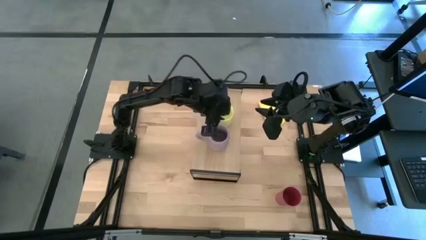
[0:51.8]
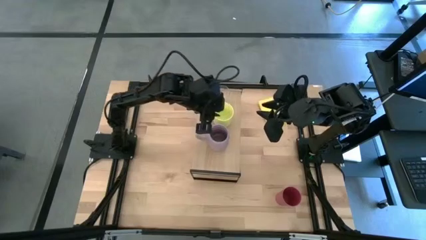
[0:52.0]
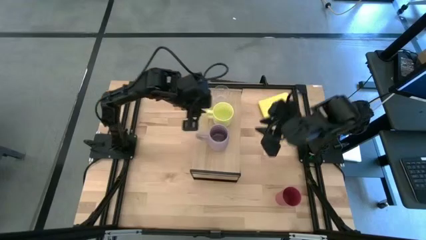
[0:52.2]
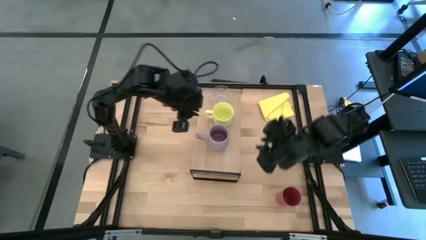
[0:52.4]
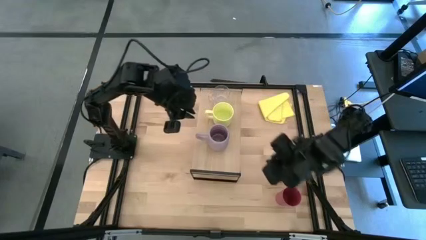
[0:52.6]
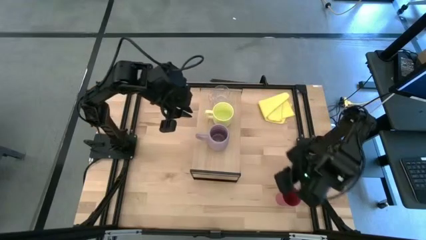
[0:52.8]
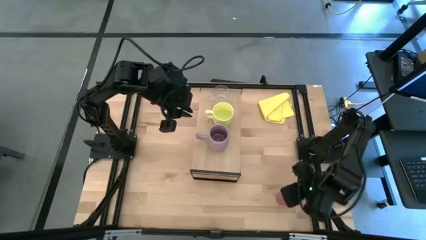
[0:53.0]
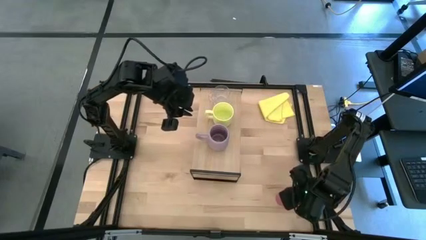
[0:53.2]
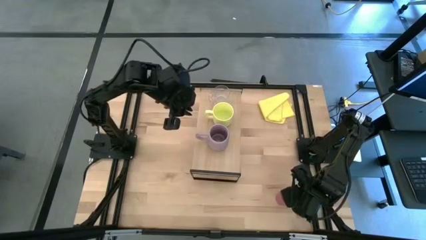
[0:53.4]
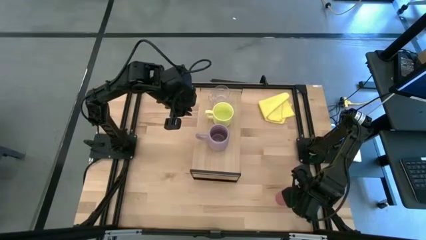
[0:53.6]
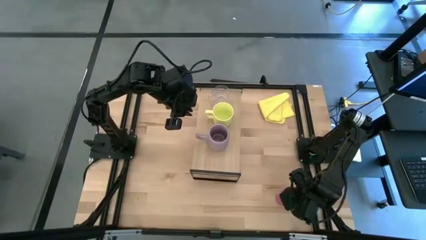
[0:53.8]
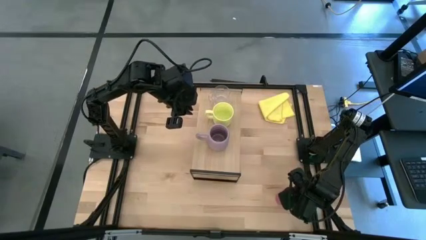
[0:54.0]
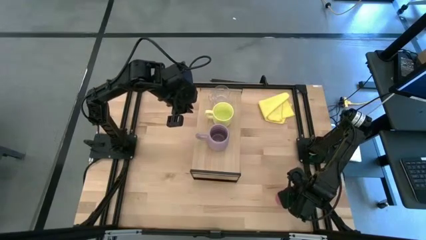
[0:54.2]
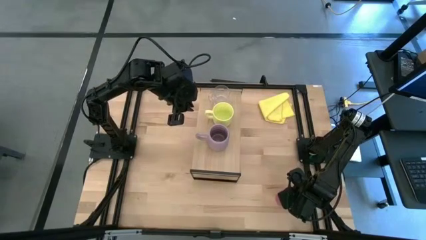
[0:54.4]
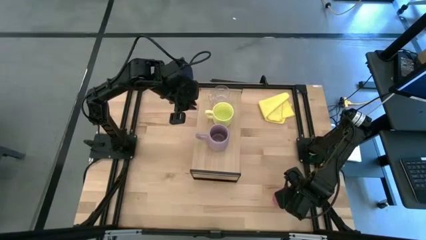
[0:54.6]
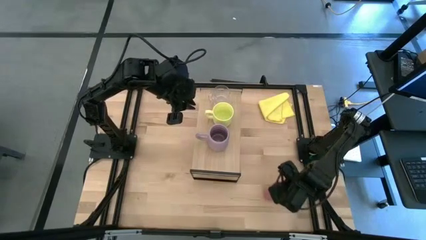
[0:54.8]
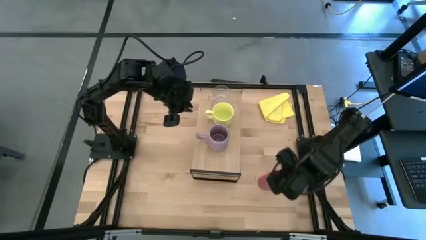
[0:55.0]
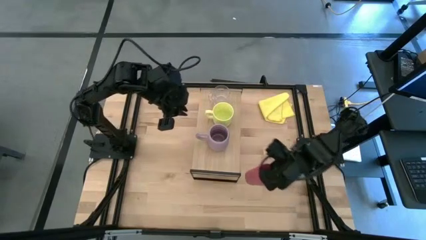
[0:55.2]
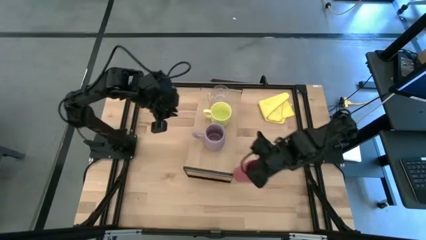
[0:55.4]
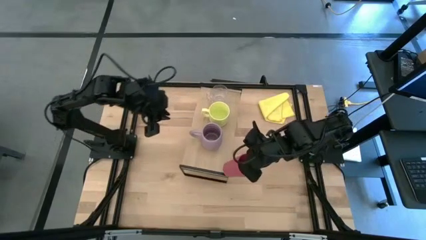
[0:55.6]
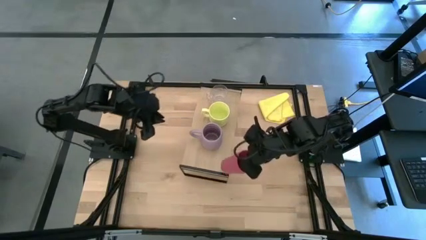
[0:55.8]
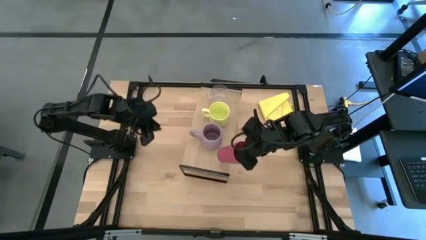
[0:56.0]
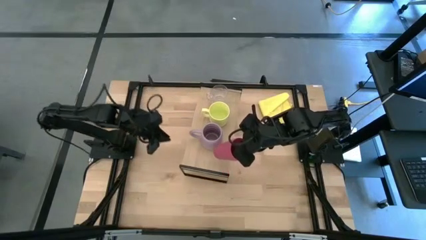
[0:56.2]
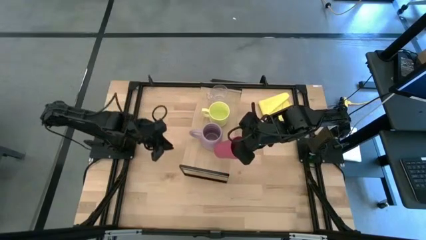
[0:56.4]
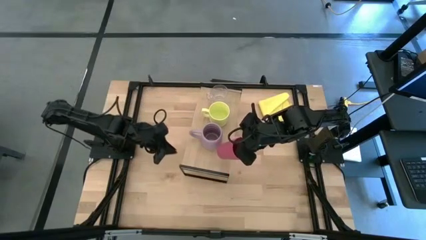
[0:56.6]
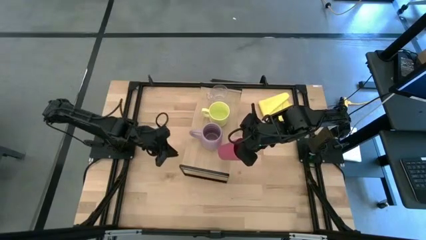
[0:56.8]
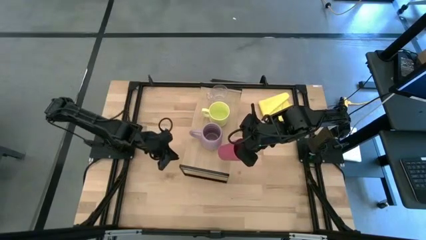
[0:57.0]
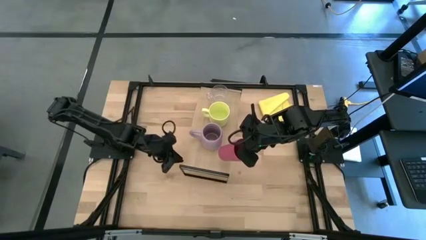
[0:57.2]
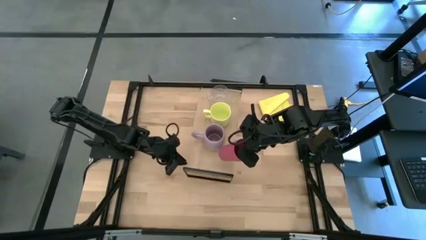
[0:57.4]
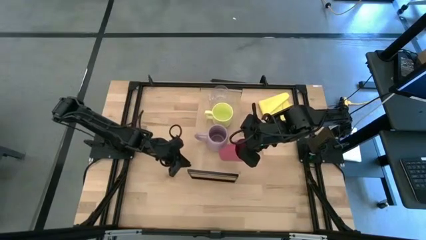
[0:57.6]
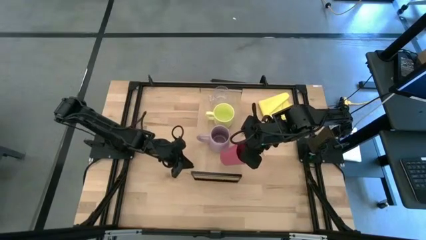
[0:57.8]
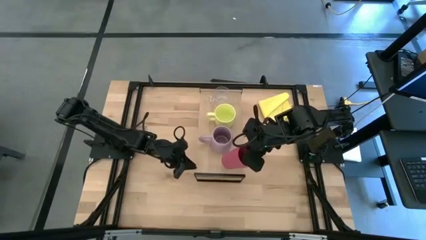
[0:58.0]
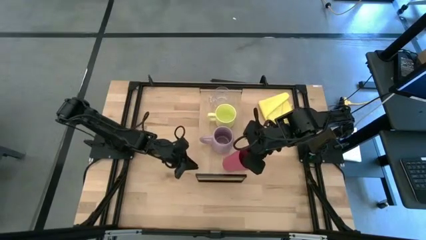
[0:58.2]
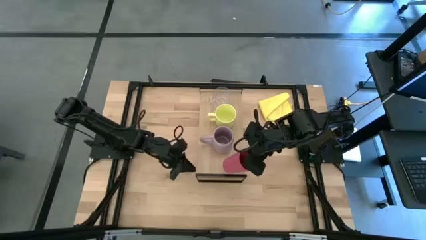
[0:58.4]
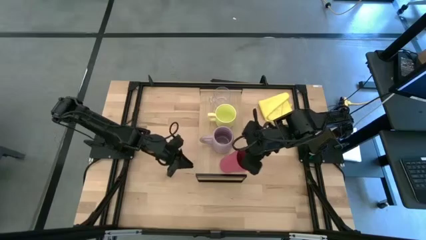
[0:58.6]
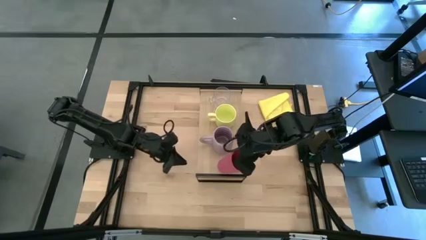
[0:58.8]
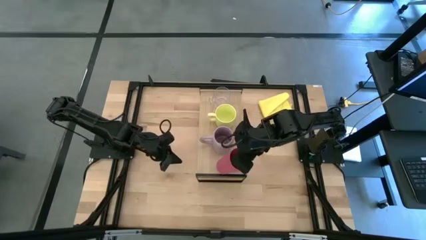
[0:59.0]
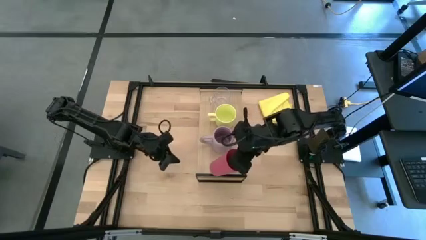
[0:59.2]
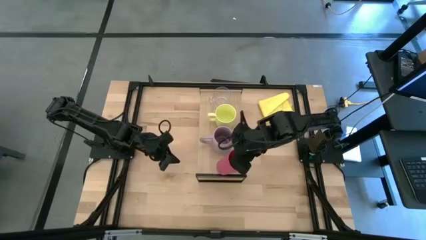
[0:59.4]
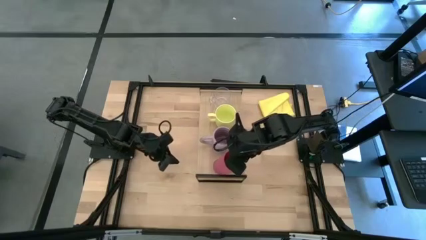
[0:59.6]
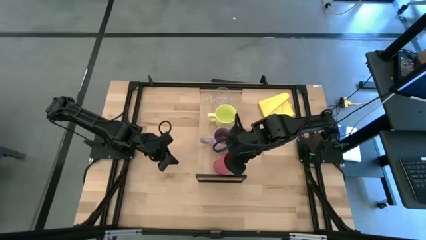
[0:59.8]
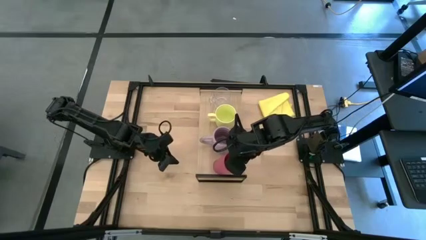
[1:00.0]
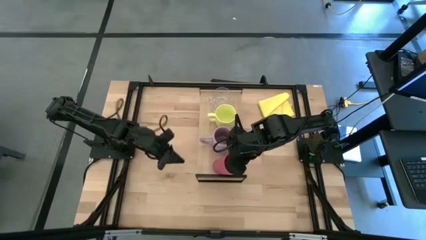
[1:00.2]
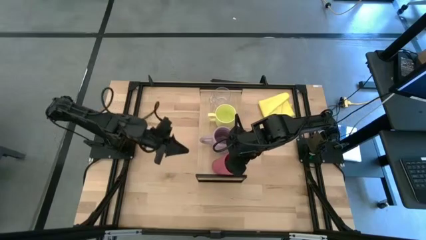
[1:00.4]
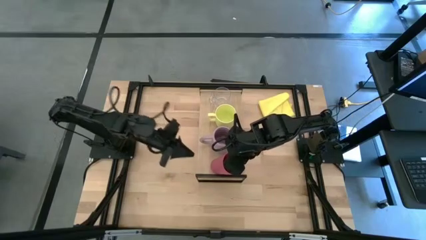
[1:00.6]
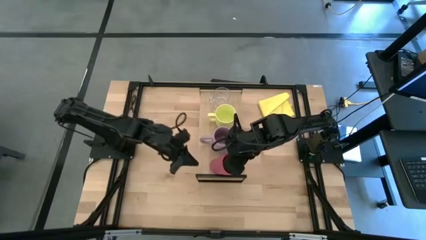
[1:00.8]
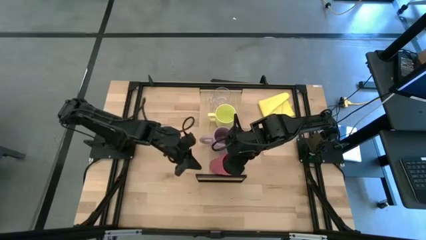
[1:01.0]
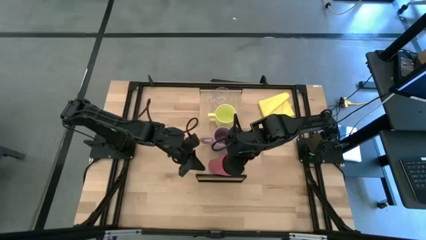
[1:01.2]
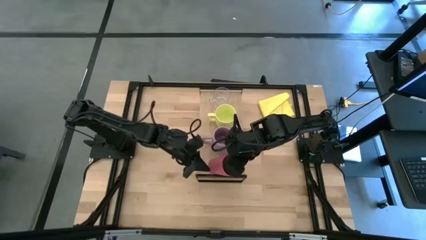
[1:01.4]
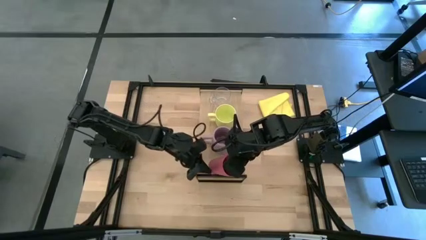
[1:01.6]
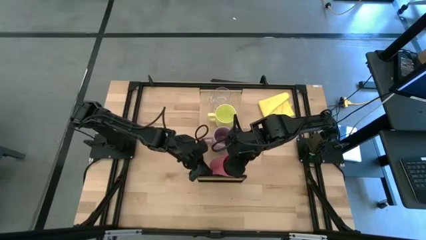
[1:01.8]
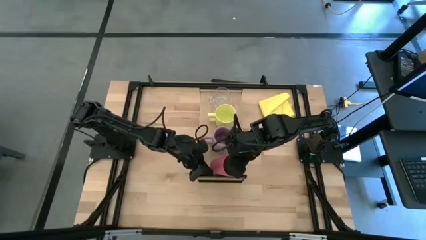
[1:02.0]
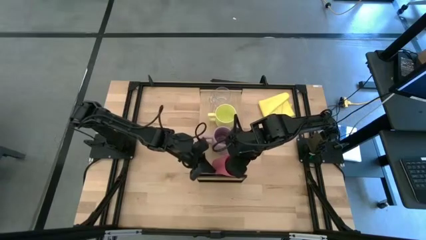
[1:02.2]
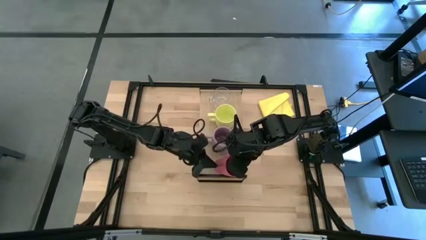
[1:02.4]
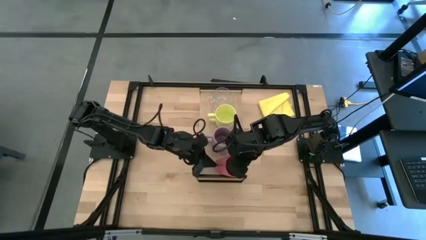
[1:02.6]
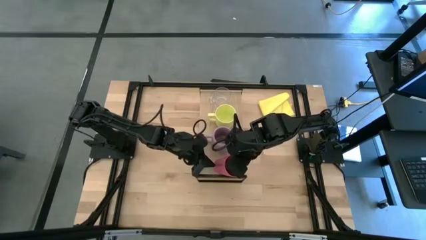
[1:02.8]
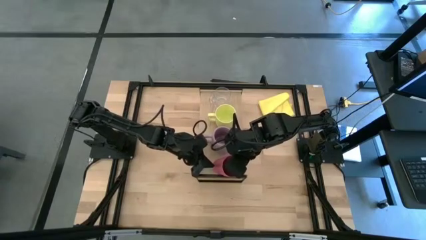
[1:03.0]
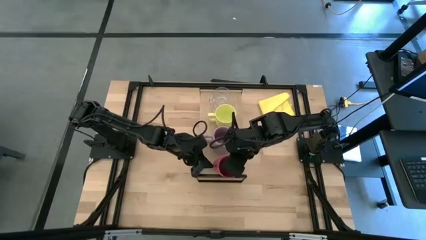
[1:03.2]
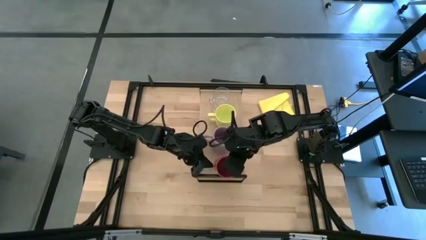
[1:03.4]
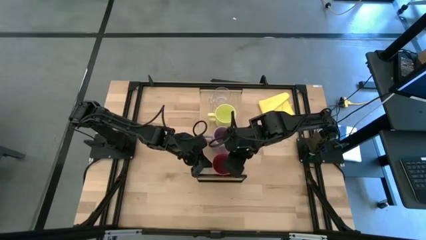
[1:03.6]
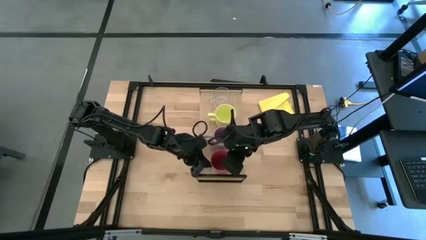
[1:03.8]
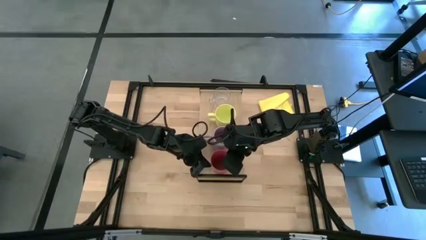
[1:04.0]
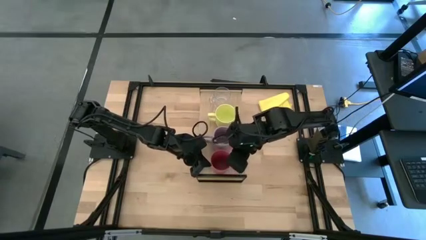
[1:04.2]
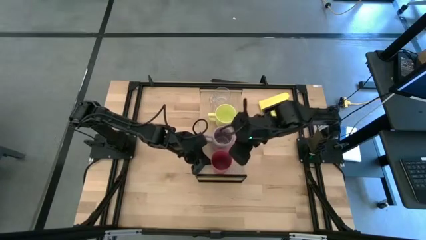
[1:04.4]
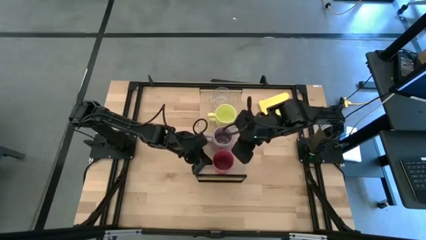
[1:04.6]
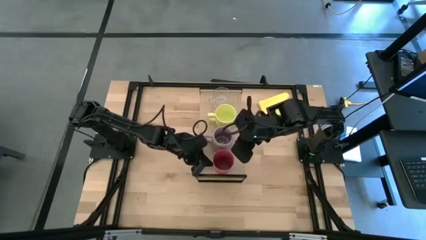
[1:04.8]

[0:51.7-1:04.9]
Task: Stack small to large cups/mugs on shelf
Put the pink cup on the shelf

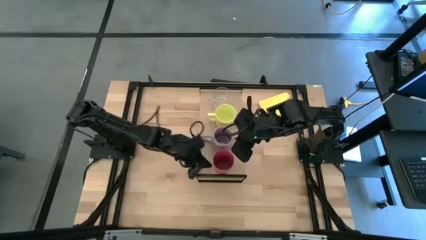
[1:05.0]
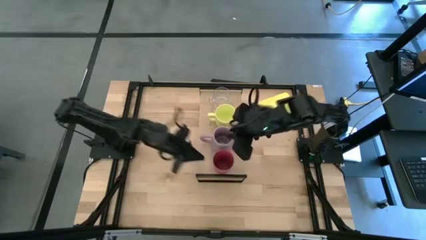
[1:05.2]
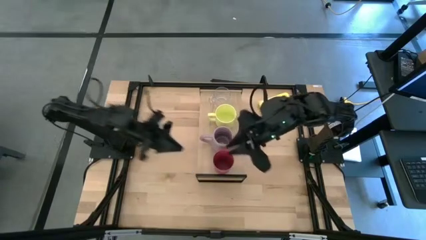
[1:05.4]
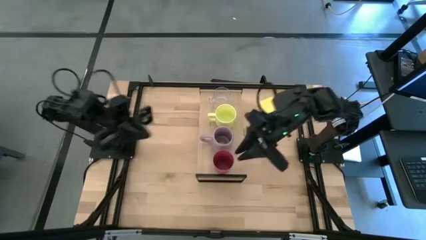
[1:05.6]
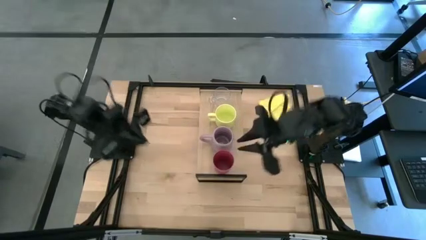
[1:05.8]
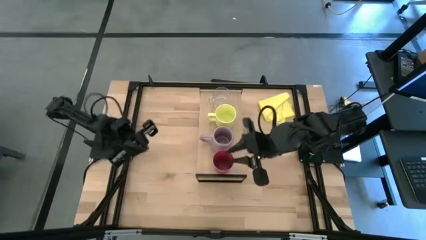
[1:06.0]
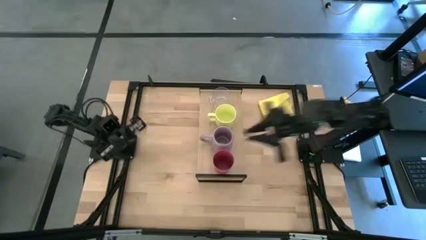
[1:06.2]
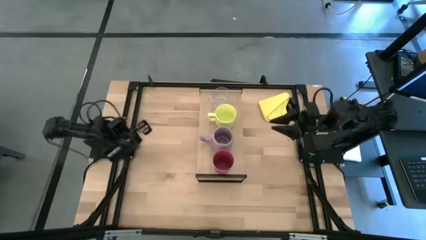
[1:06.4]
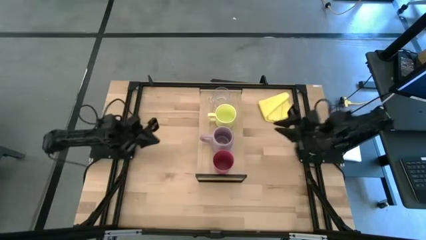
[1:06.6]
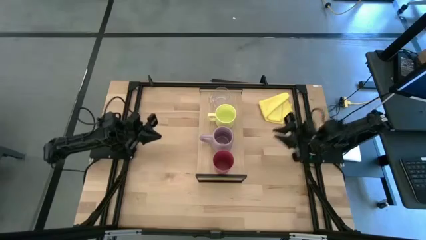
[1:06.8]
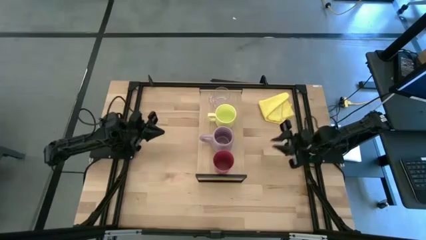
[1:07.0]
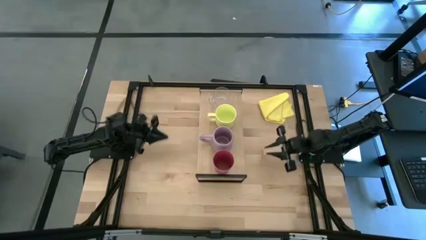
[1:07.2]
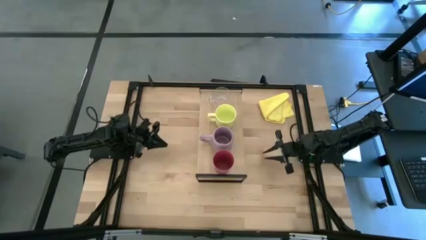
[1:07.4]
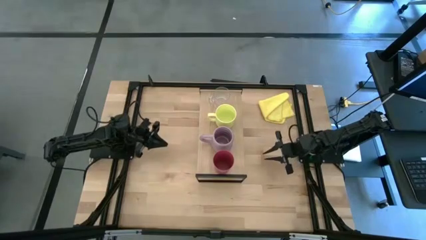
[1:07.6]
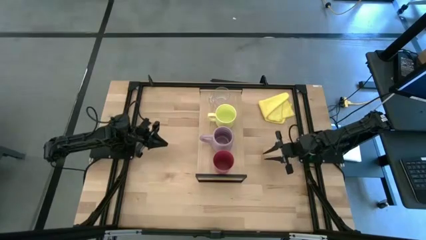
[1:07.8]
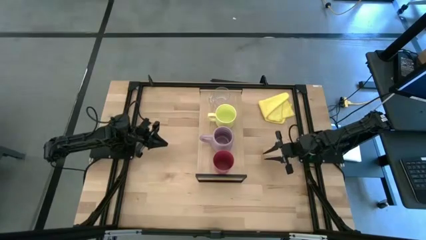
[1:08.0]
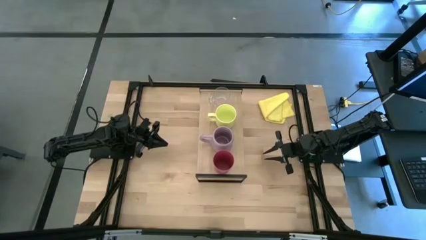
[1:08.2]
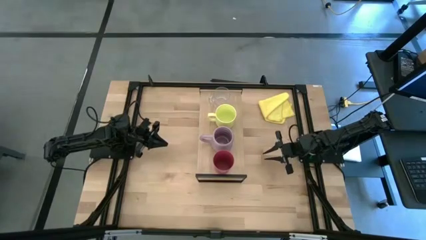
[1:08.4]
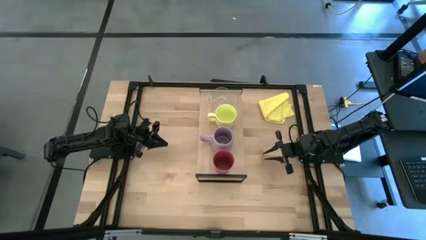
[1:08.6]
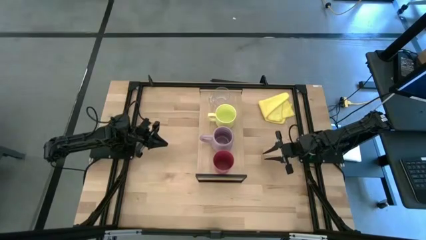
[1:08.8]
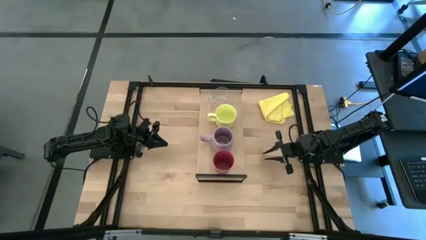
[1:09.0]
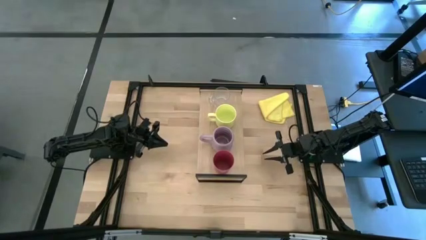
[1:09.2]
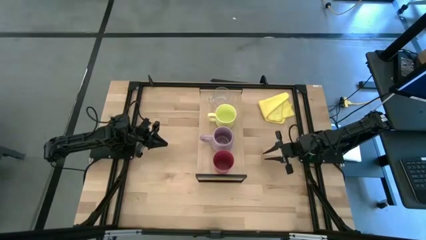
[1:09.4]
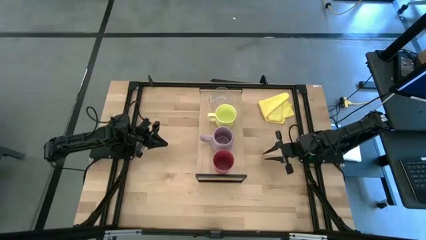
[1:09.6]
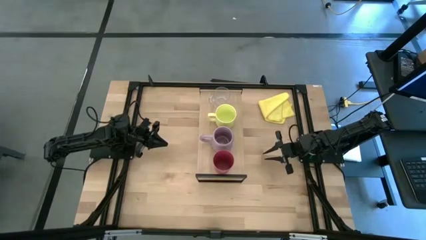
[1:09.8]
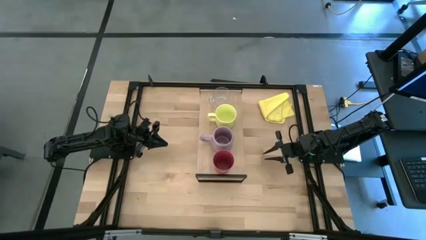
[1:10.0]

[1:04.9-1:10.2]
Return to Home Position
